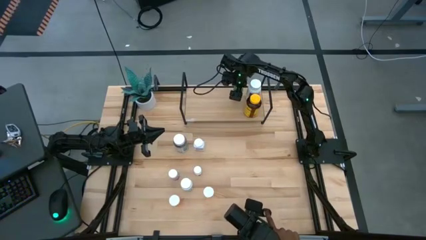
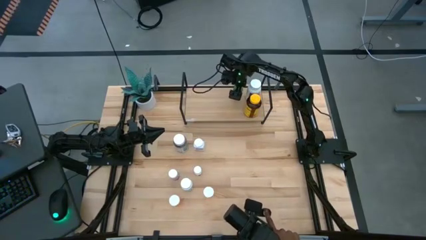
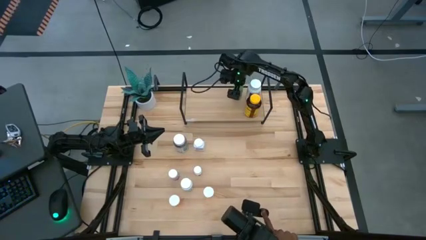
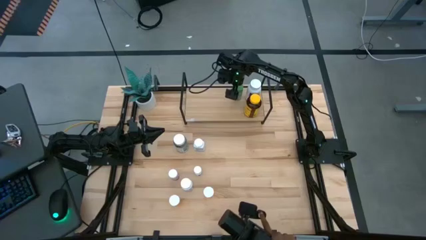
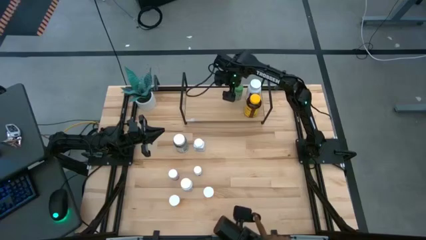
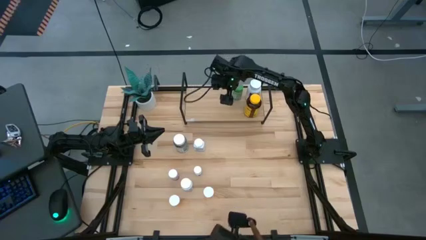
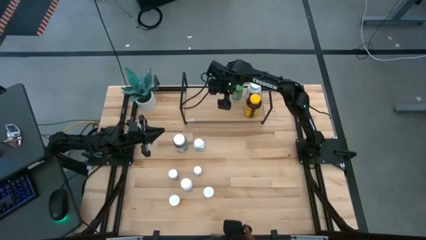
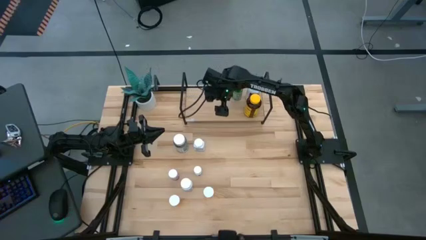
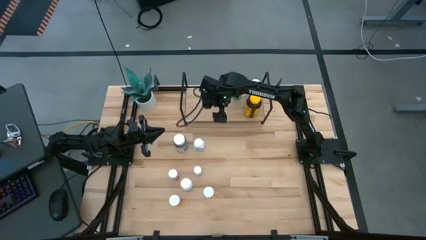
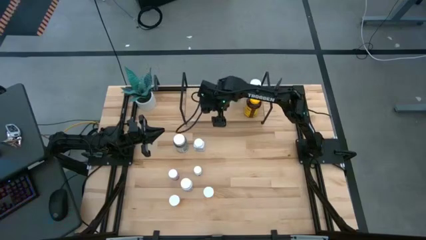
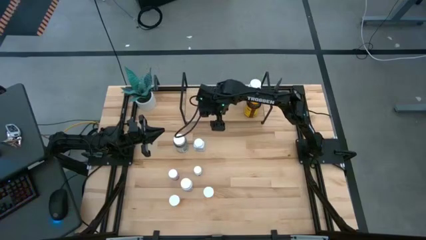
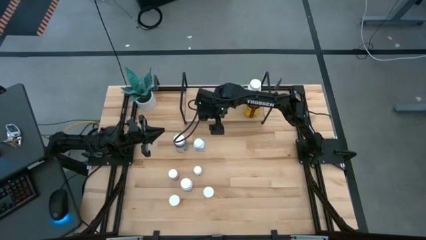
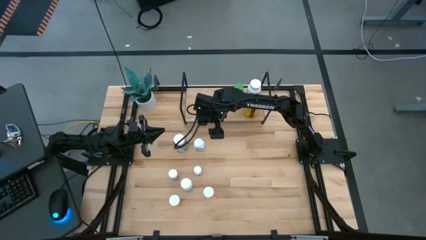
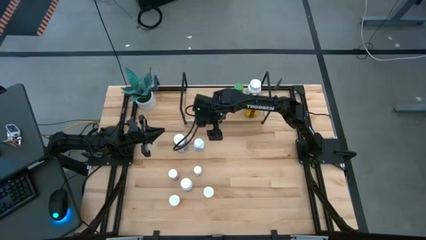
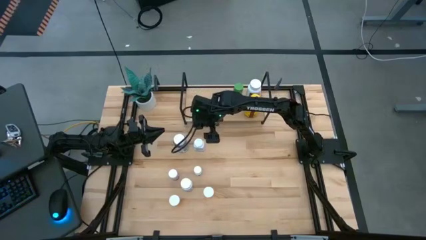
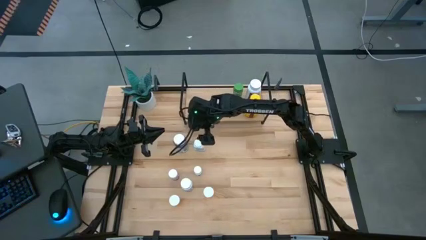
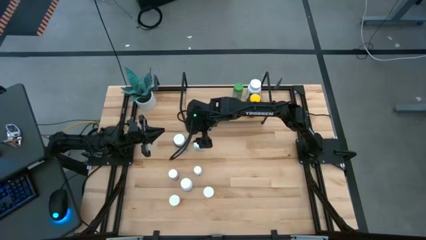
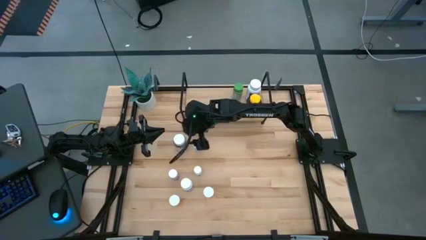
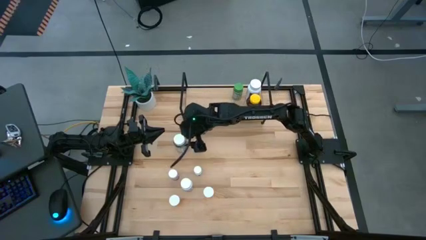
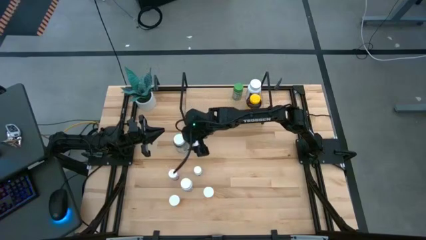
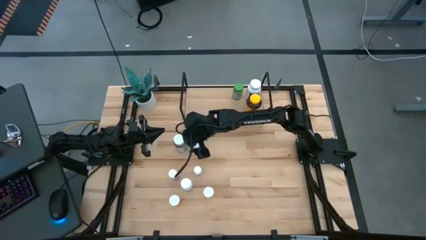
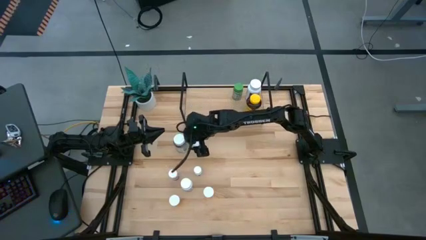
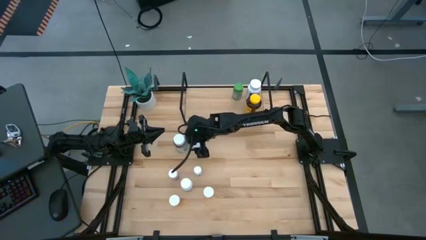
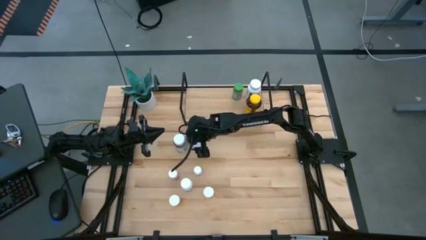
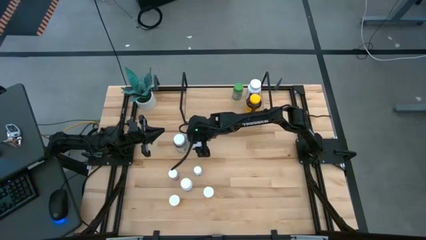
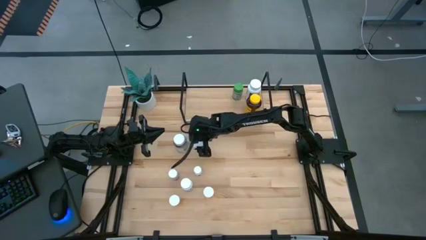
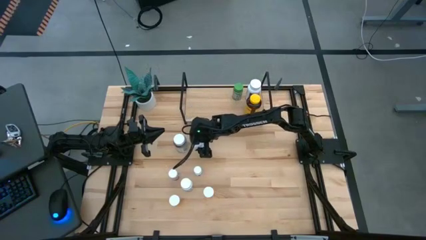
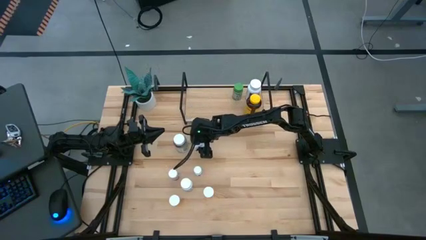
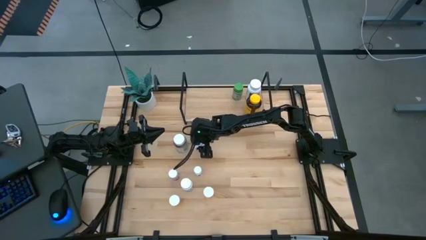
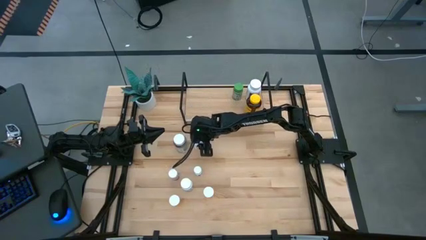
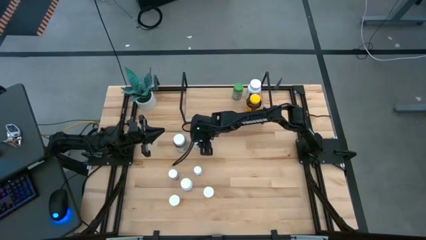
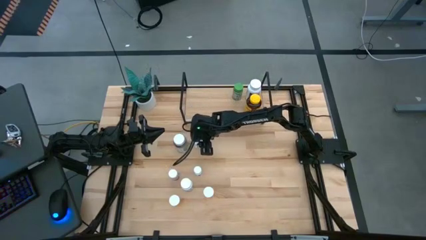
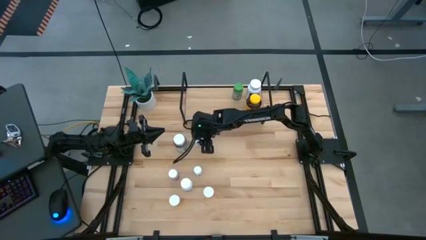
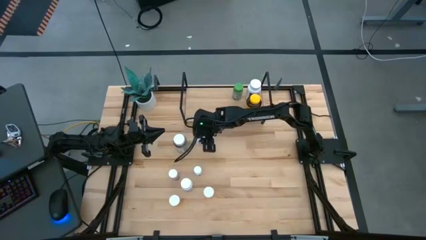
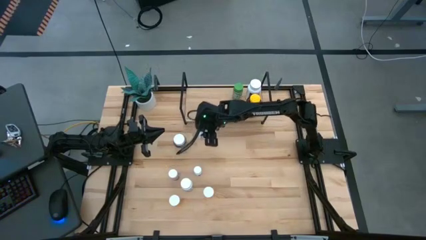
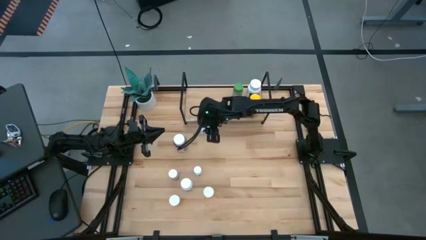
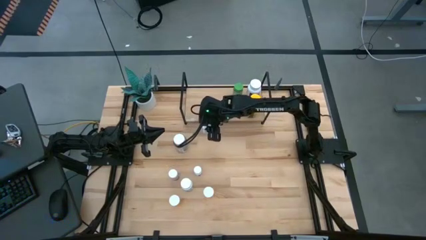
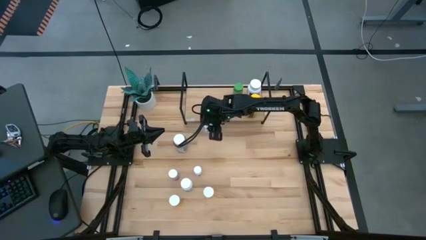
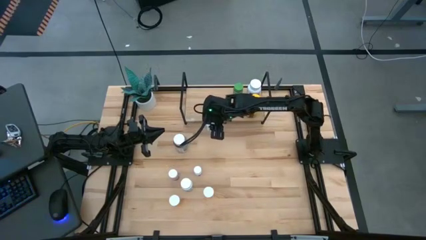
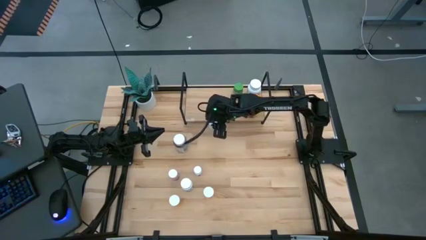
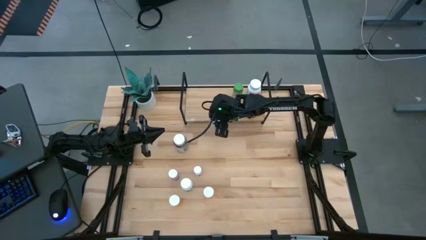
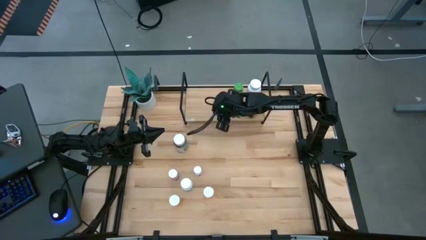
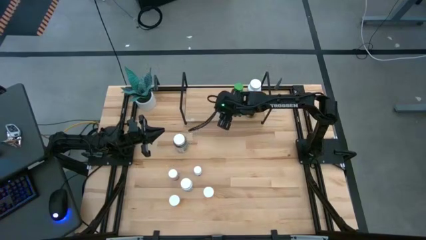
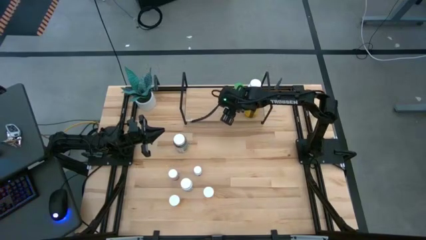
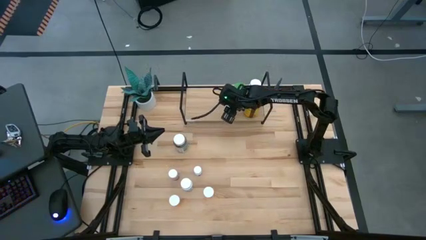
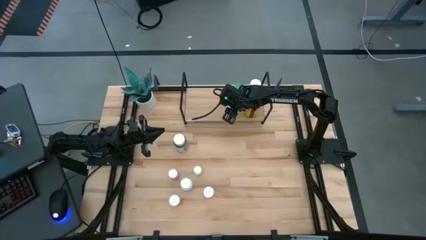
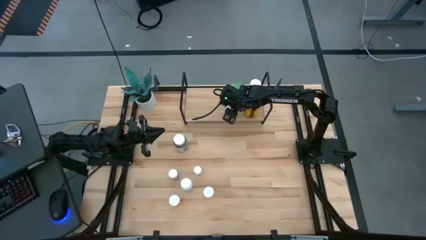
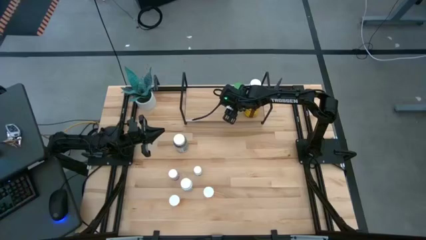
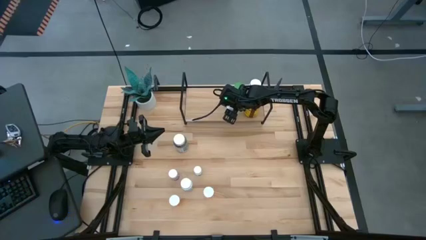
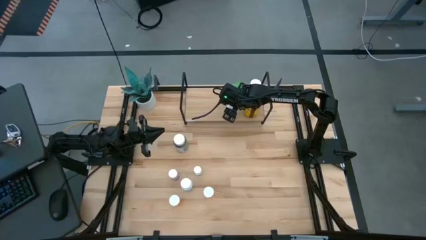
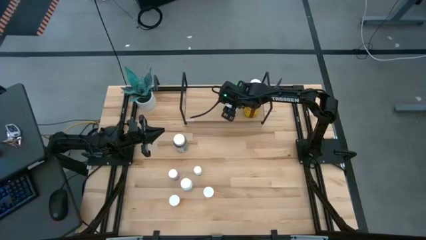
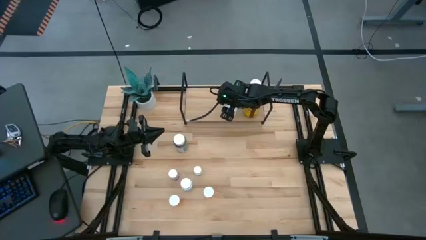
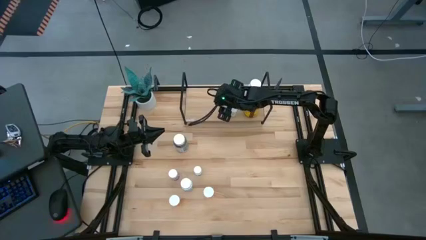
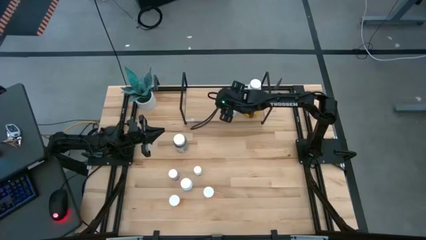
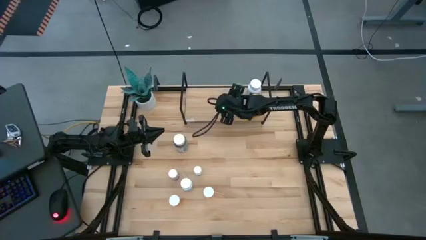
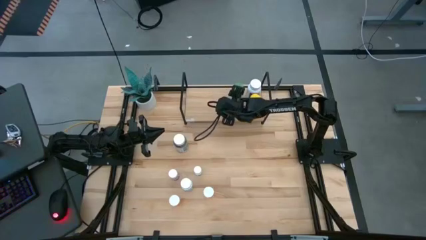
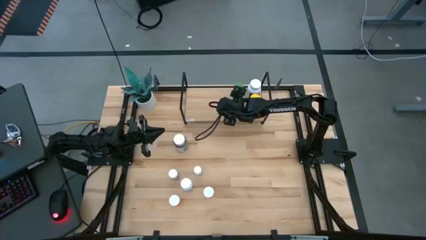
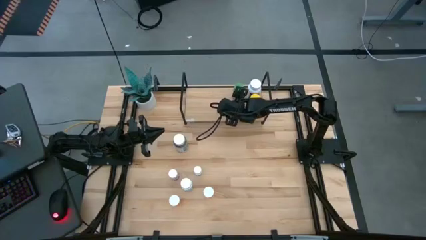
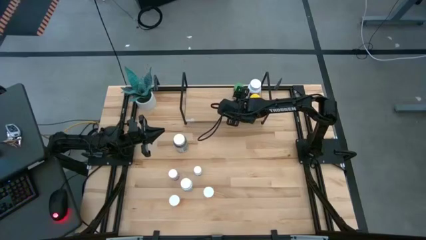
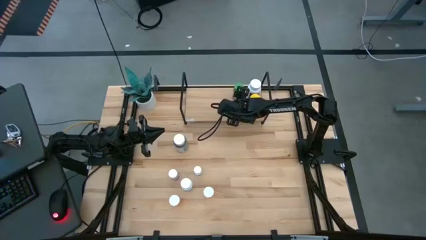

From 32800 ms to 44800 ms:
Task: Pick and place medicine bottles onto shelf by color
Put the white medicine bottle on the shelf
